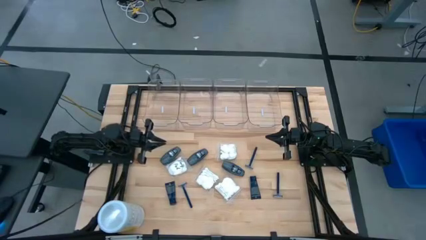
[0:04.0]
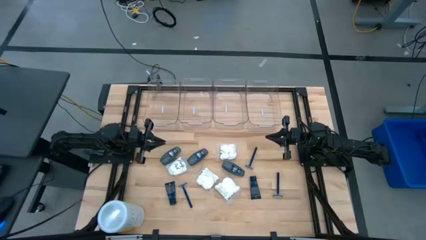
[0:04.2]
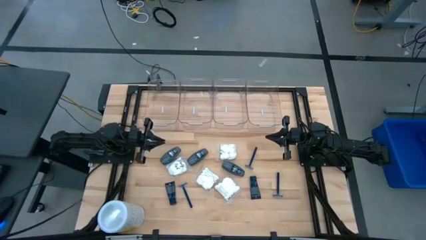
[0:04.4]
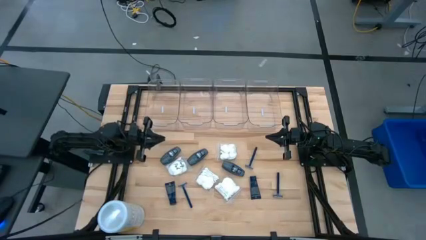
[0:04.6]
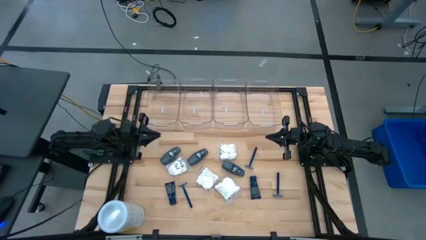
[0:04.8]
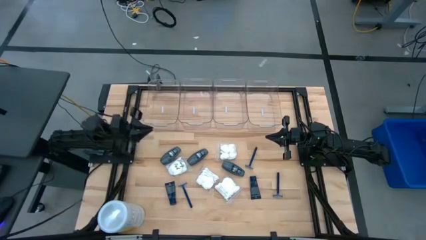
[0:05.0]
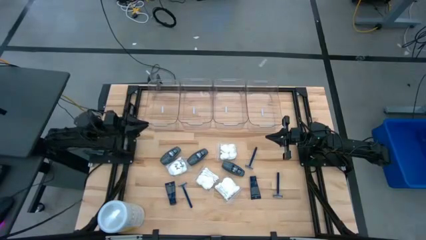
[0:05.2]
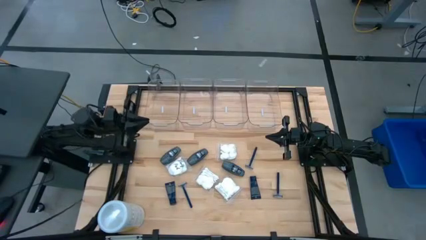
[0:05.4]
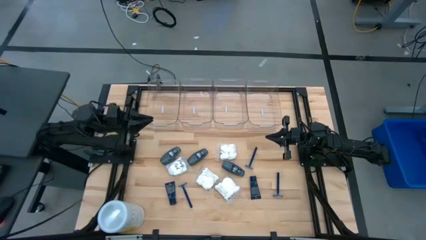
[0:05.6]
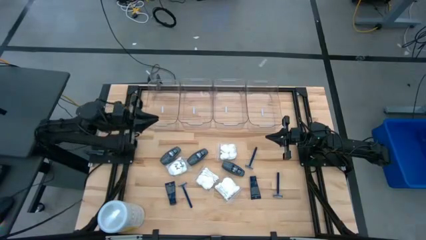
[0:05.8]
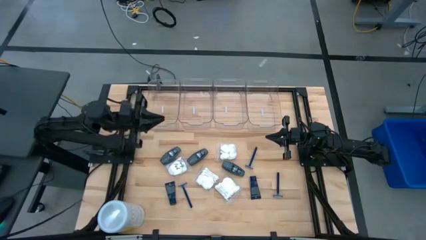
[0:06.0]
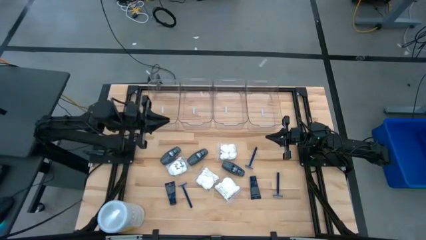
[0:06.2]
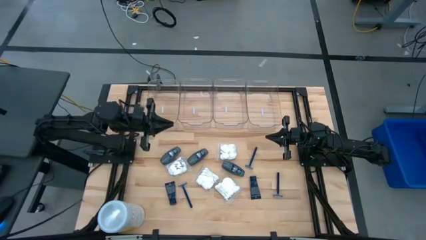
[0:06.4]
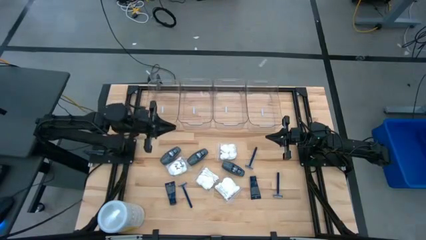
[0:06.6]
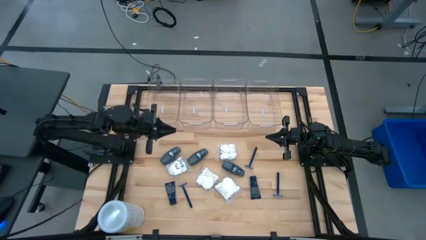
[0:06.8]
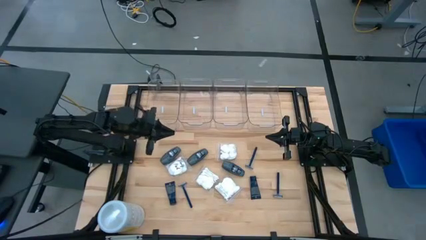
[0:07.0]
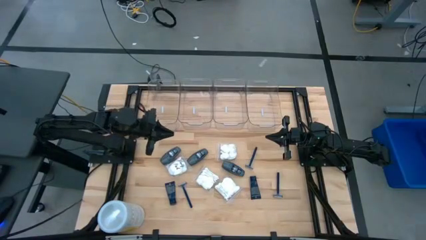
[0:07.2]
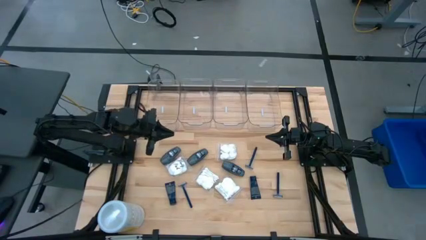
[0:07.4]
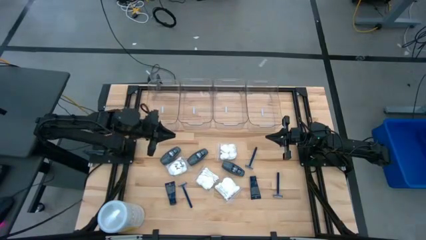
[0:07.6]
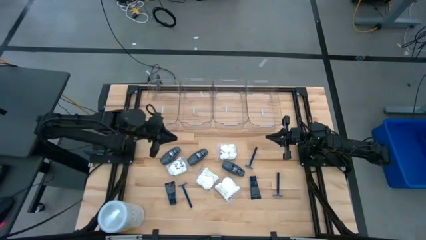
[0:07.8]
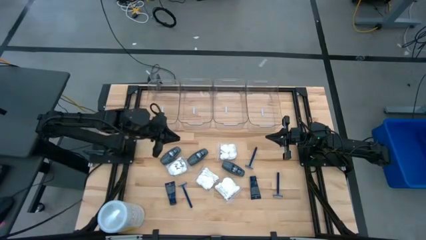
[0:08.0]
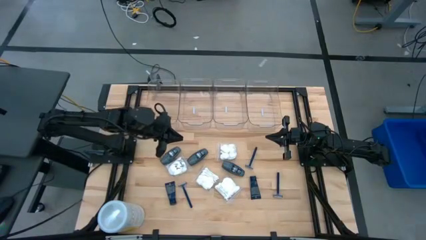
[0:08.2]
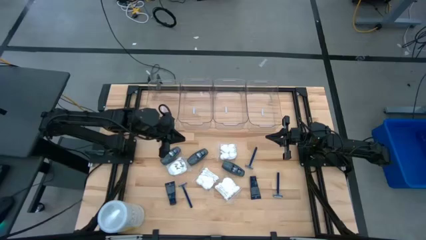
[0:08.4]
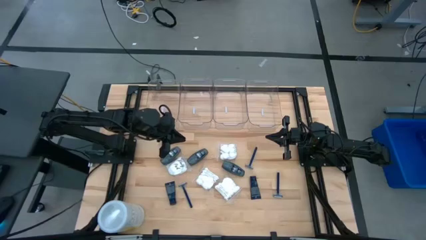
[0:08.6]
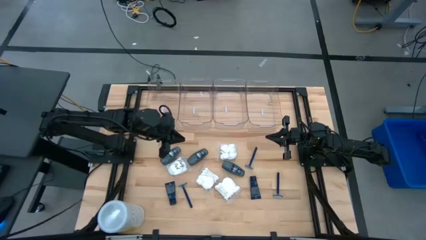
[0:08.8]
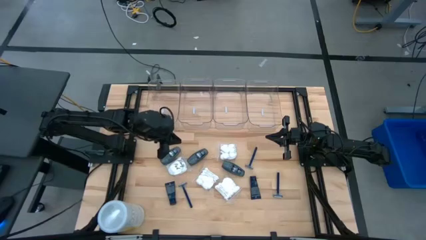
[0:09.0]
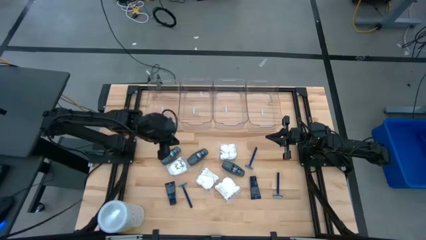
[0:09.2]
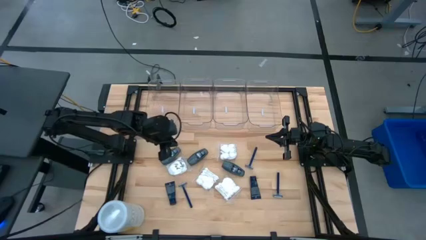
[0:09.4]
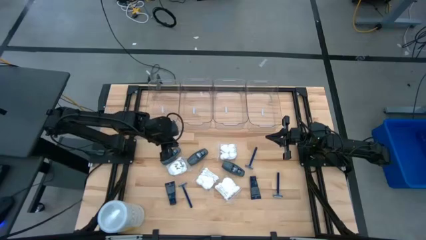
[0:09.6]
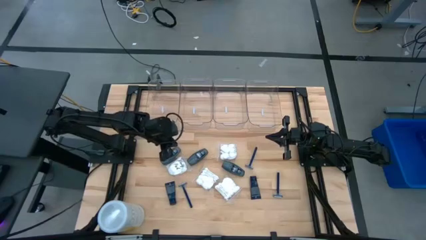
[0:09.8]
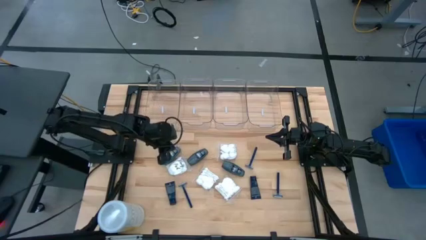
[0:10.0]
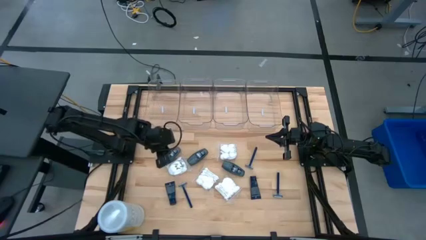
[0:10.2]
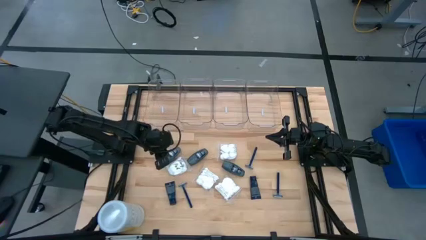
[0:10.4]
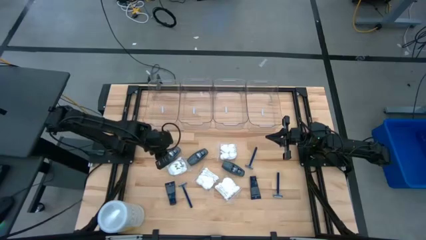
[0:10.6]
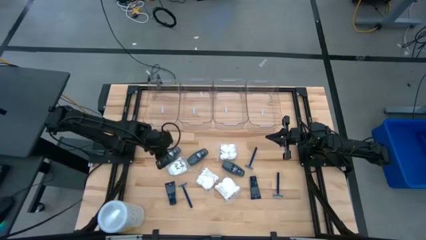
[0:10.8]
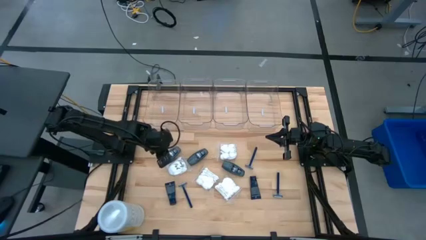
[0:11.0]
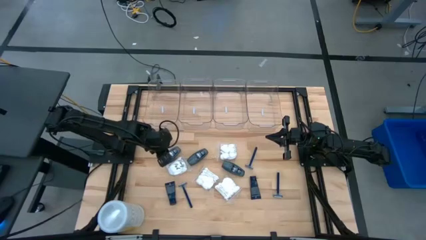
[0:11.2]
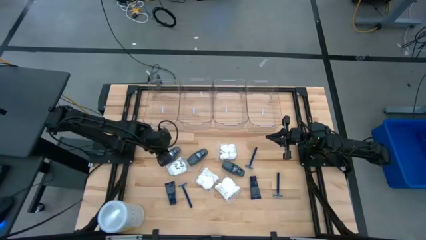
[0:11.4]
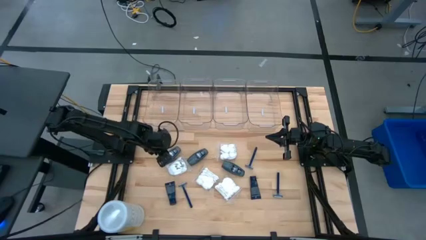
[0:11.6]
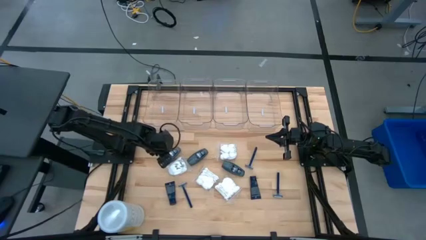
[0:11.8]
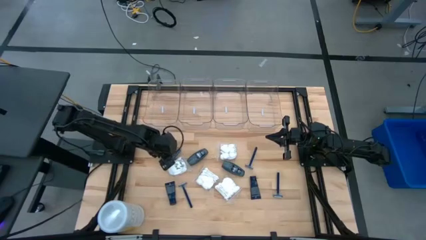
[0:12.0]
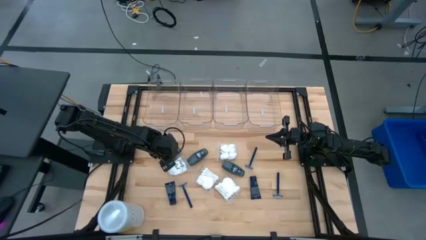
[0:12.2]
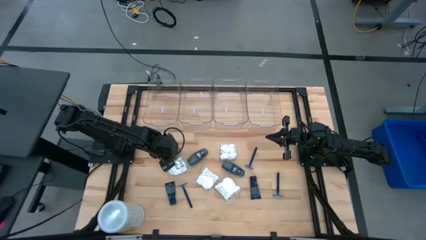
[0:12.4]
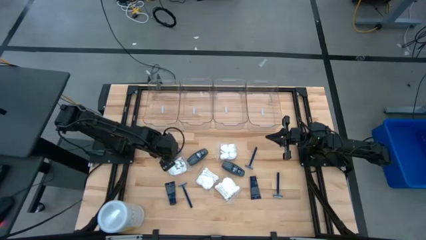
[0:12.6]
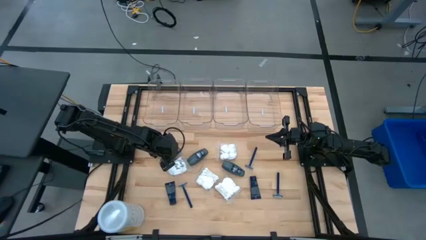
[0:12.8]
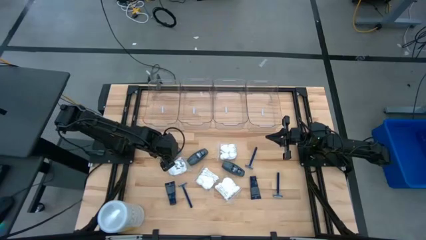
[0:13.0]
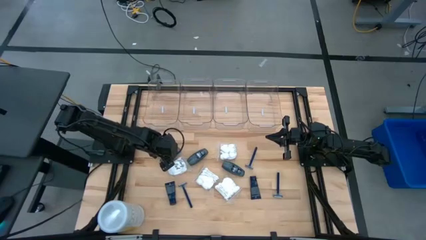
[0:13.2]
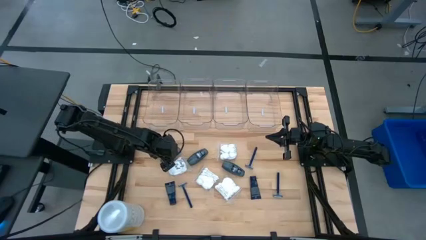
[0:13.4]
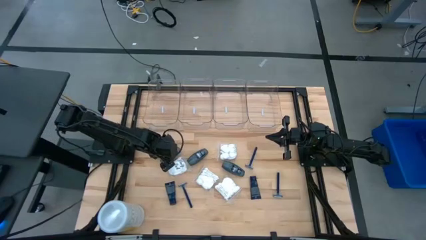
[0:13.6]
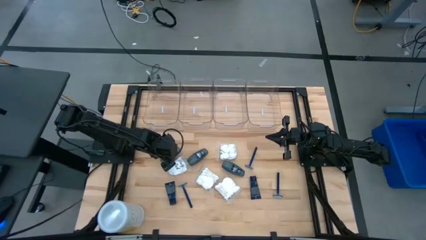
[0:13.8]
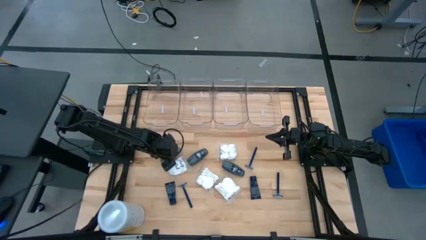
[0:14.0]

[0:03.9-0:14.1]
Task: Pick & Place Travel size toiletries
Put the left gray deodorant into the left transparent bin
